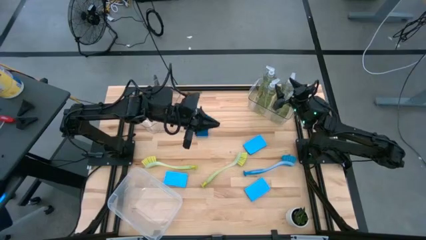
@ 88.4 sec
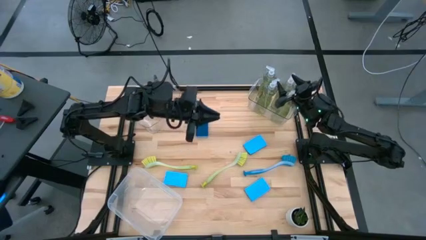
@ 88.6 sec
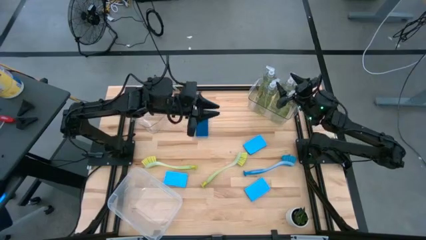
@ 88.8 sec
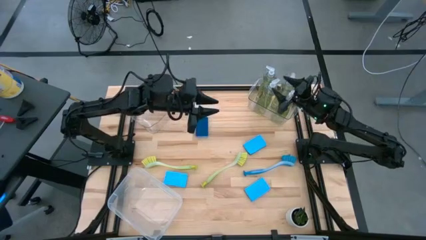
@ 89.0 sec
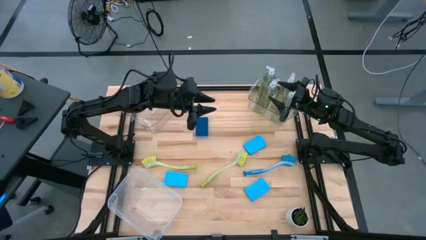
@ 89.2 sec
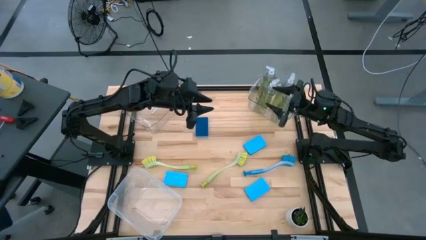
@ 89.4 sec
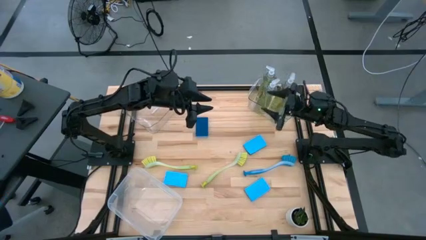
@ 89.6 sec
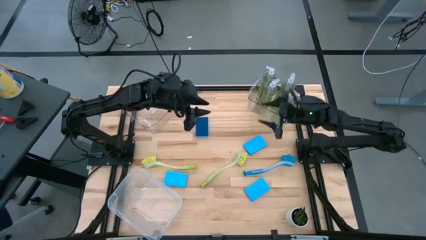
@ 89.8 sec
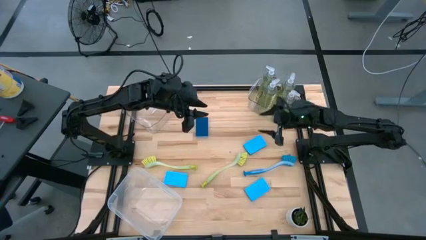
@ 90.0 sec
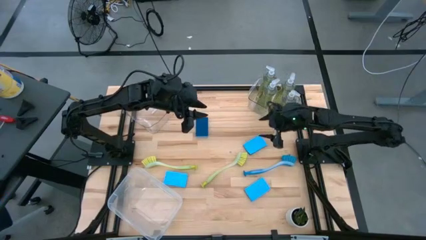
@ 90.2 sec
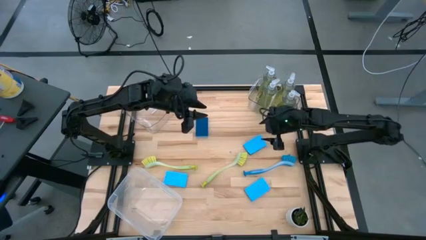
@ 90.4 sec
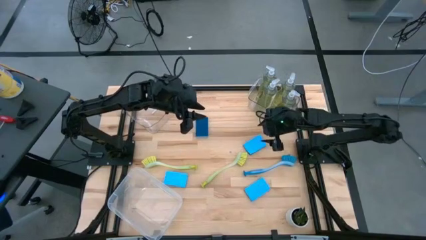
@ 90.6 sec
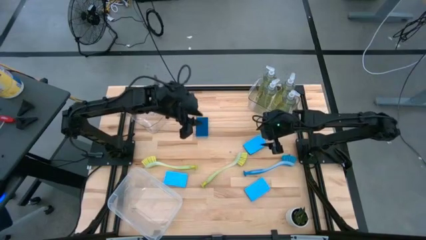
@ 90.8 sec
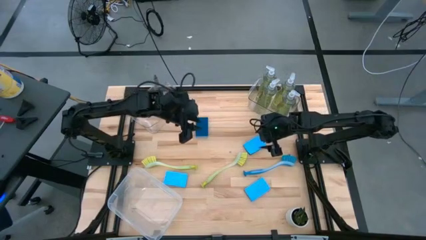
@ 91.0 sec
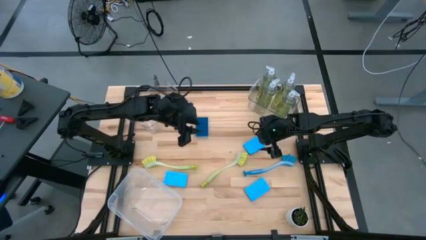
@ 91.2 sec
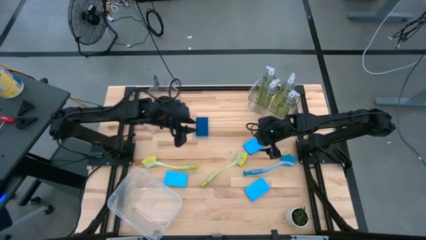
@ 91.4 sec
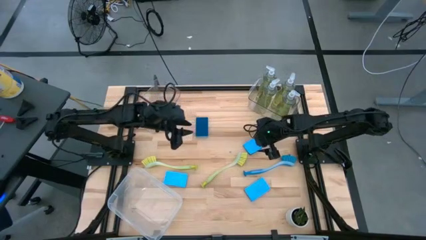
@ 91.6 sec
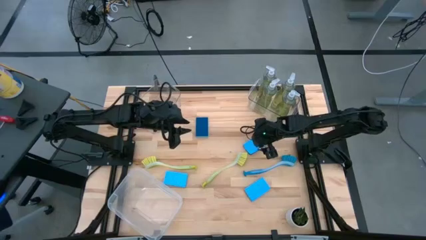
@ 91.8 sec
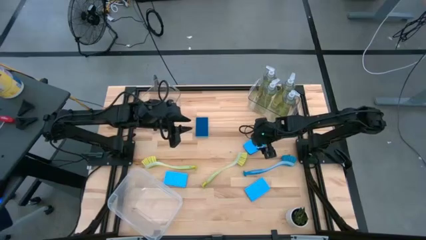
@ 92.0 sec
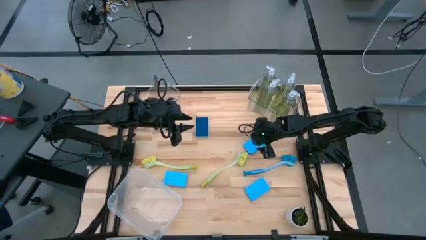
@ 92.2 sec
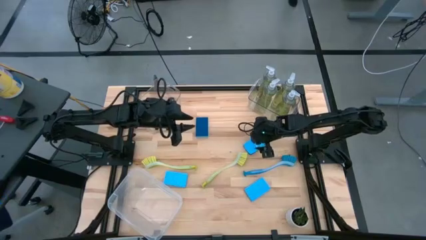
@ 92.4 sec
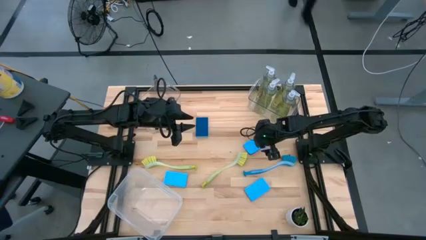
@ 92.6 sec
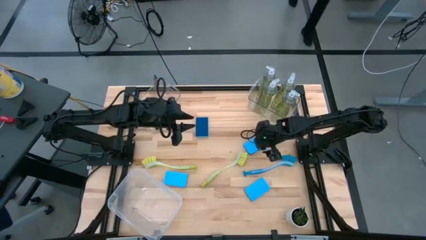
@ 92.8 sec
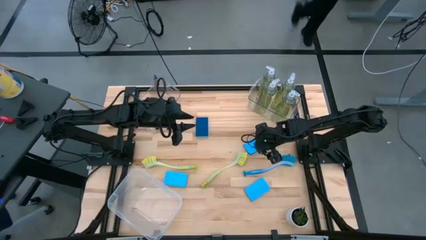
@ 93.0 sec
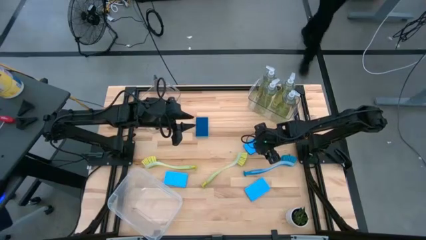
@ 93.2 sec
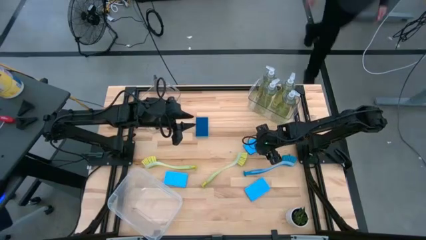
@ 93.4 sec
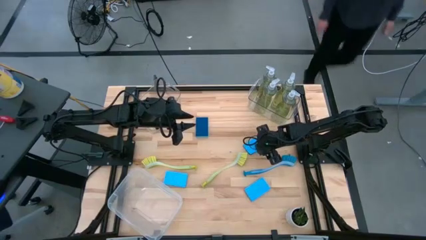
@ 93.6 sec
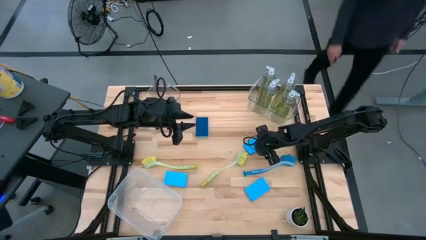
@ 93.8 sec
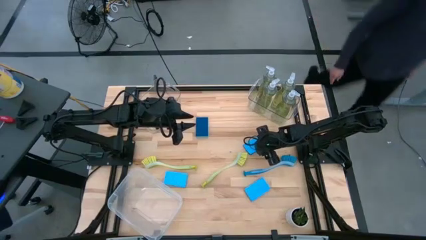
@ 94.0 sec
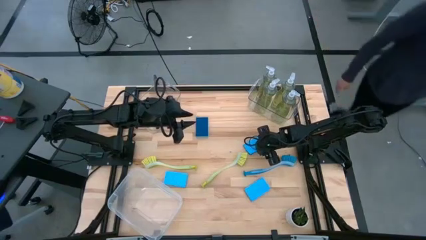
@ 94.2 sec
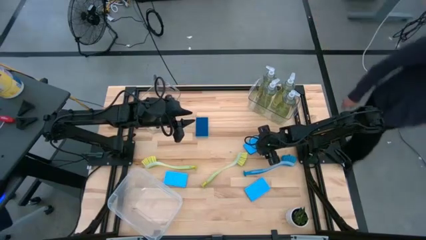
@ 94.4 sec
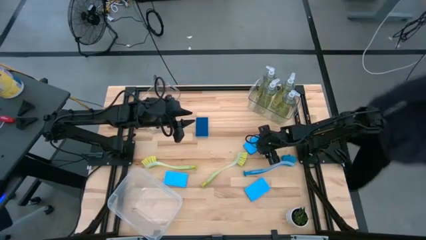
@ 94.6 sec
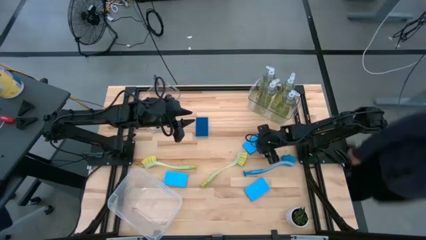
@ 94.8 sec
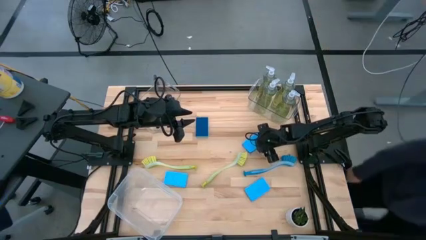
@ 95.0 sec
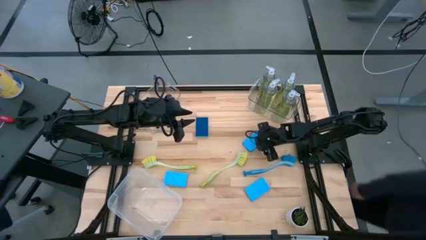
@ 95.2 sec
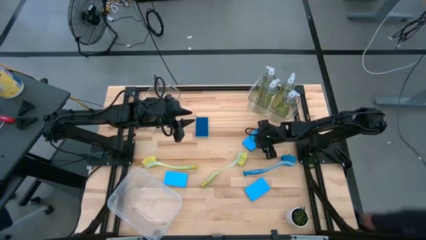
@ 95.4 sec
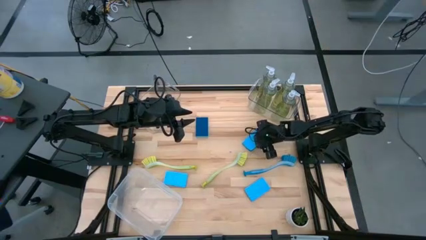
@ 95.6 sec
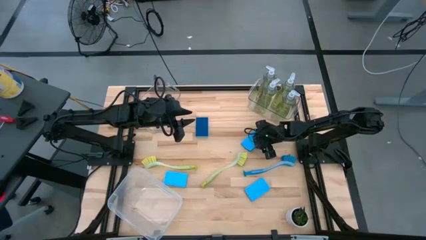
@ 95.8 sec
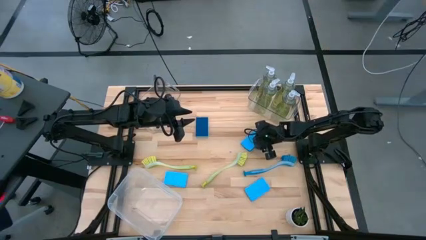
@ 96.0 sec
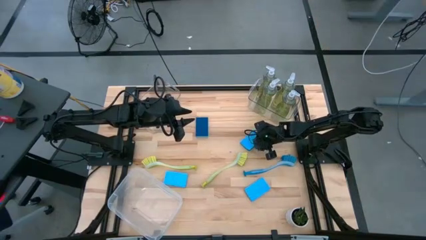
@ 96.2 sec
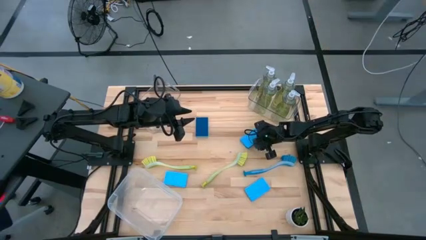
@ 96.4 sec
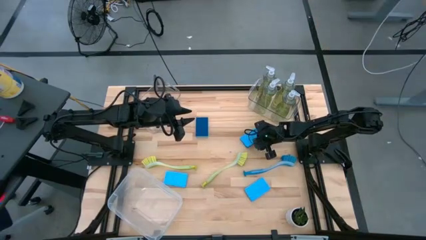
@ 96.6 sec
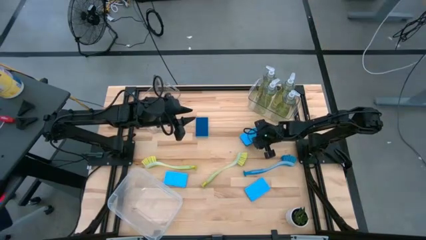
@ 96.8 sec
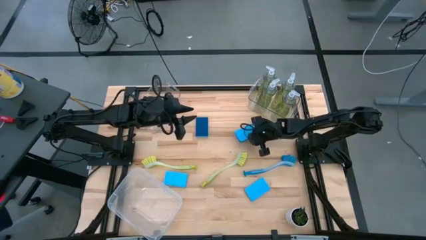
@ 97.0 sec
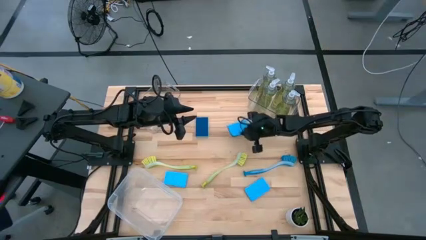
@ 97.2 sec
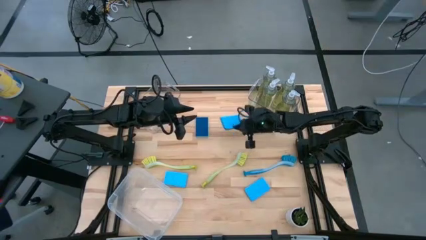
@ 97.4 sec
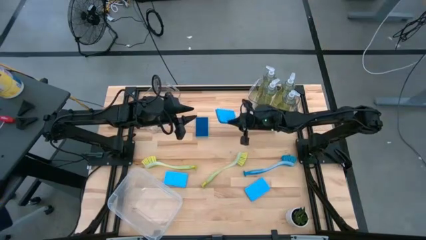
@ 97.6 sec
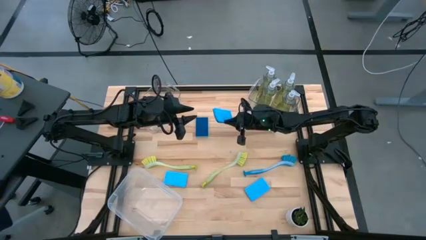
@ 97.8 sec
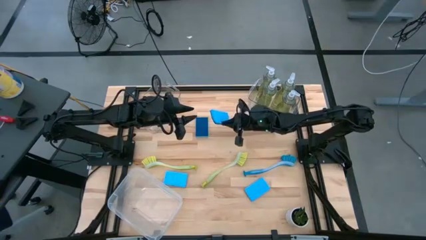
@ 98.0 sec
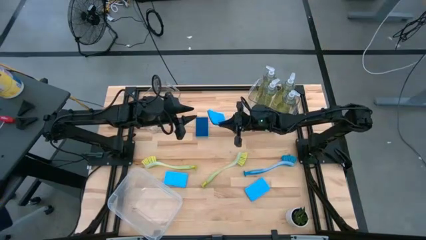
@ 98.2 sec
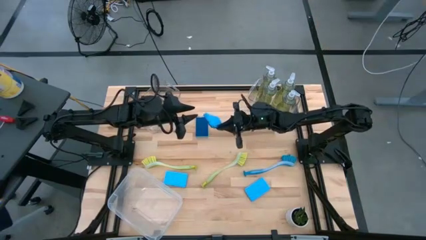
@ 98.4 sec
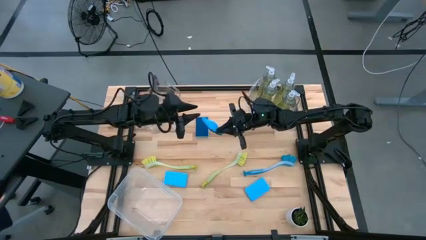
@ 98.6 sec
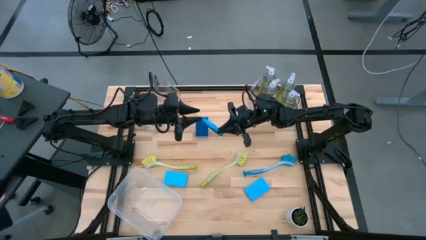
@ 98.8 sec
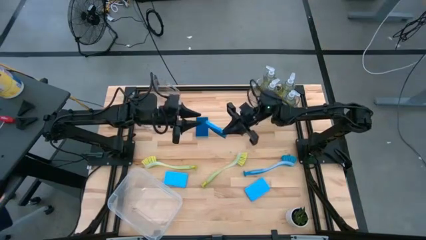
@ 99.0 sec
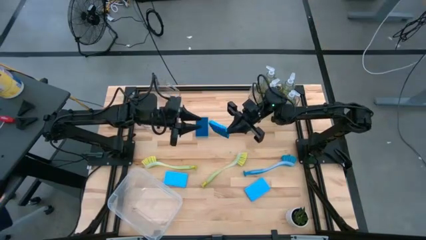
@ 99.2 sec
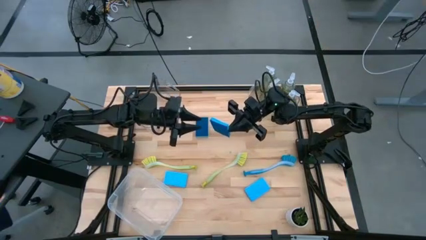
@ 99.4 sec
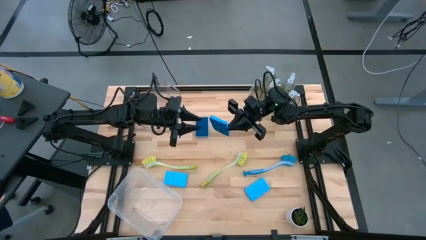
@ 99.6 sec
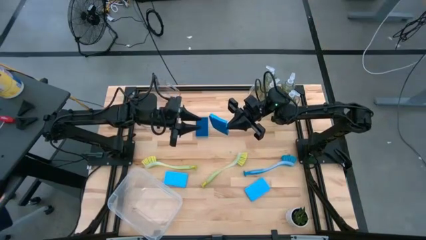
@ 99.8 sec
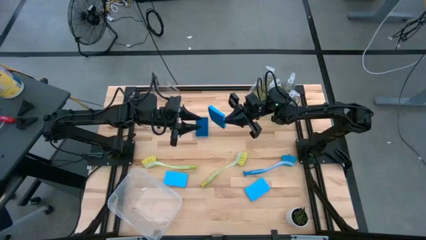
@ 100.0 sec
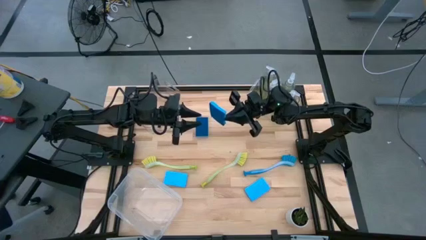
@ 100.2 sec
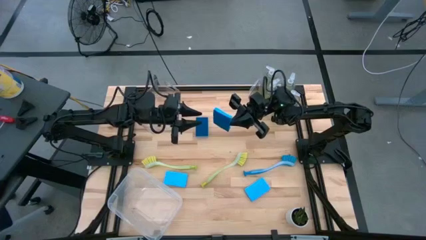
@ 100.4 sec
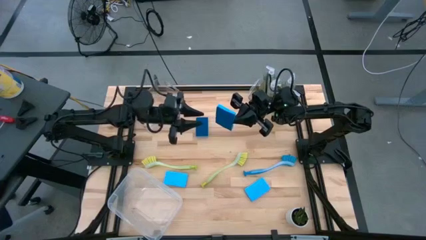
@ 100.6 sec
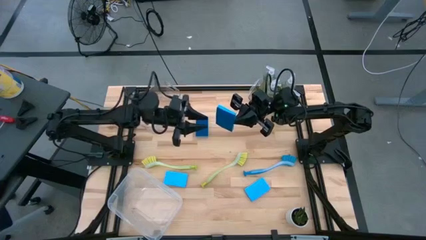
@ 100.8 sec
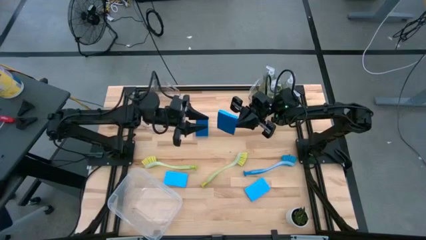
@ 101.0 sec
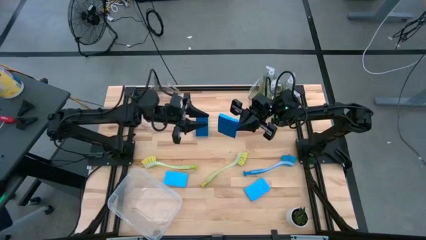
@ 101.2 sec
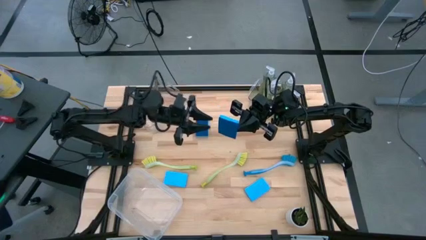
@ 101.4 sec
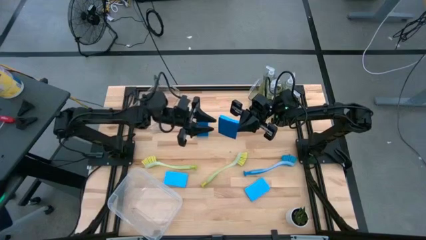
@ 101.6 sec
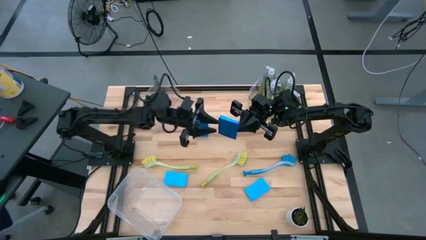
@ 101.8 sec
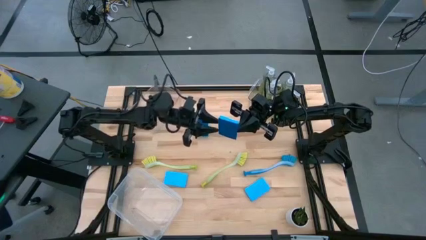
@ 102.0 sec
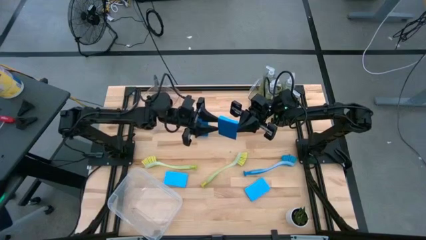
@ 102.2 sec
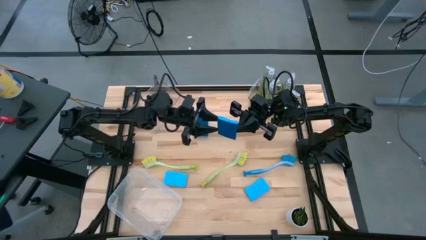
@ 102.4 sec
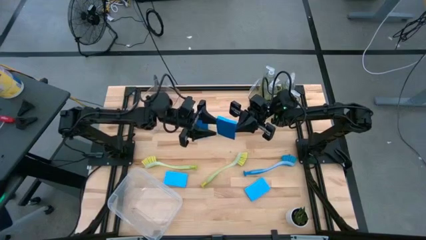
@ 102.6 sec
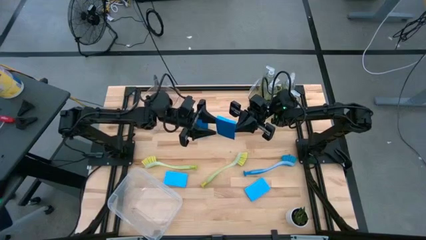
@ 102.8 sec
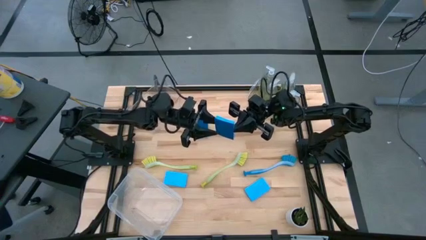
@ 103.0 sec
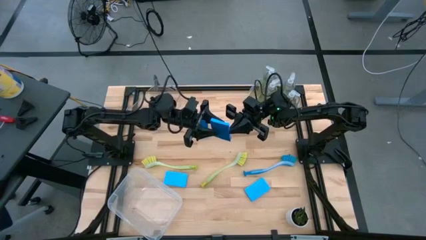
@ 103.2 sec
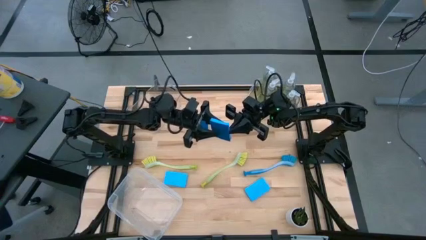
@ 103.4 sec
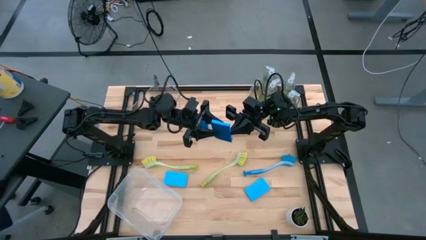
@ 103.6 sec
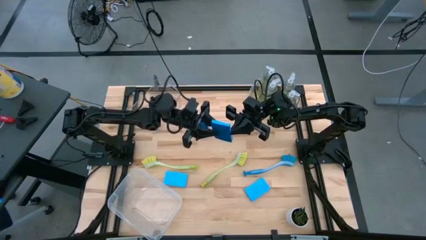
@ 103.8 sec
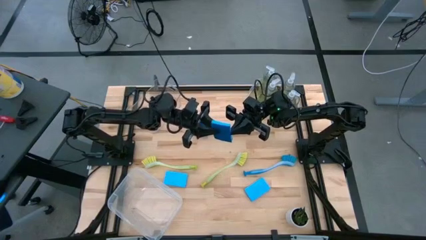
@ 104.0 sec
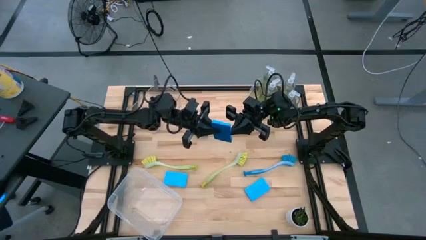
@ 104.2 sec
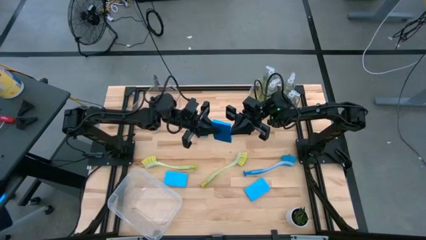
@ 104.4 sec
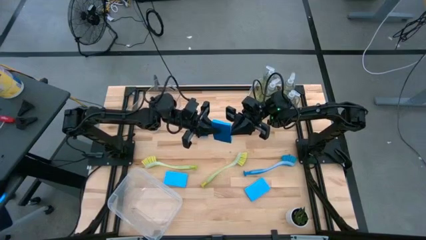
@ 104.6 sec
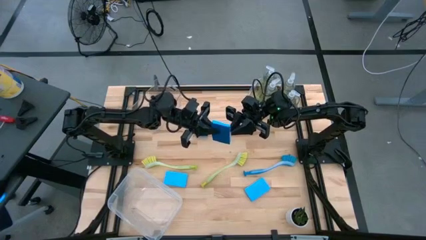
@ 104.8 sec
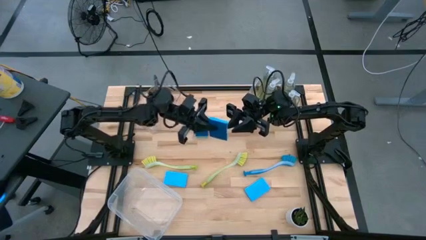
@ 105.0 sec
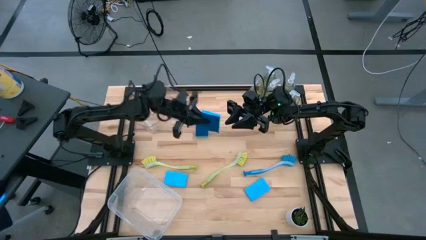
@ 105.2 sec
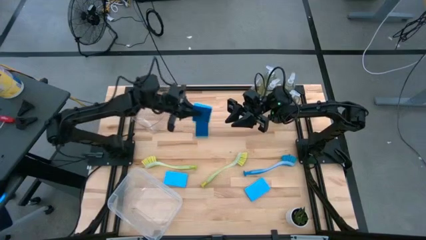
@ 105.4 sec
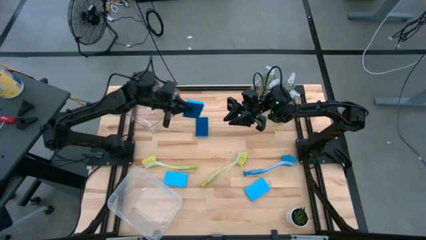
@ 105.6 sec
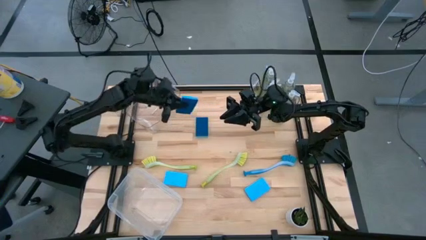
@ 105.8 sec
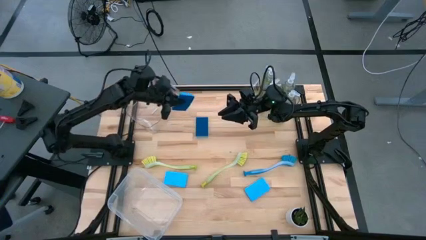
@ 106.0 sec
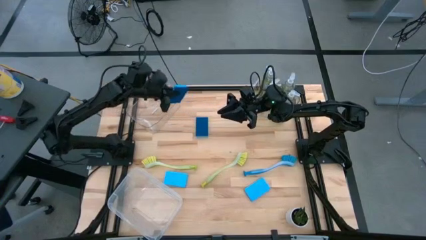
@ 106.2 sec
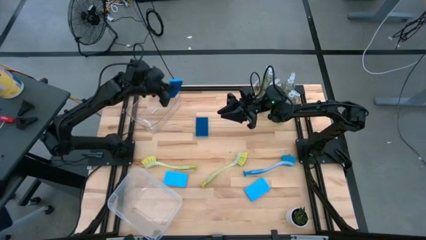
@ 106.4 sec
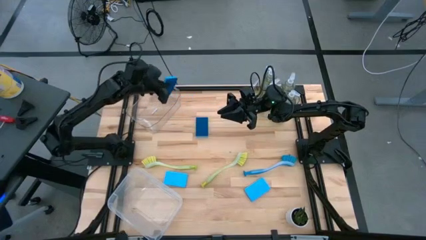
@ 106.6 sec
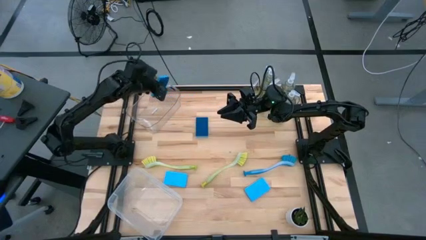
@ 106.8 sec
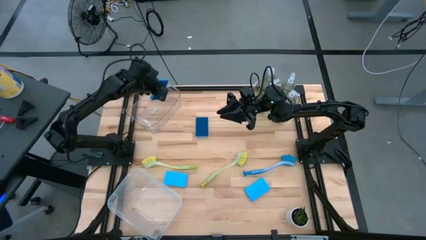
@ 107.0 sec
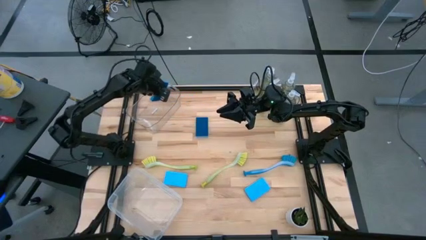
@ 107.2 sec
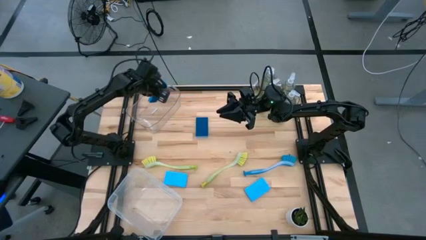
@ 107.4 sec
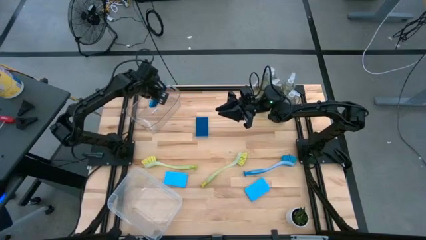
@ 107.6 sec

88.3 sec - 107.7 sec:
Task: Pick & Place Kitchen Sink Supplies
Put the blue sponge into the left transparent bin
